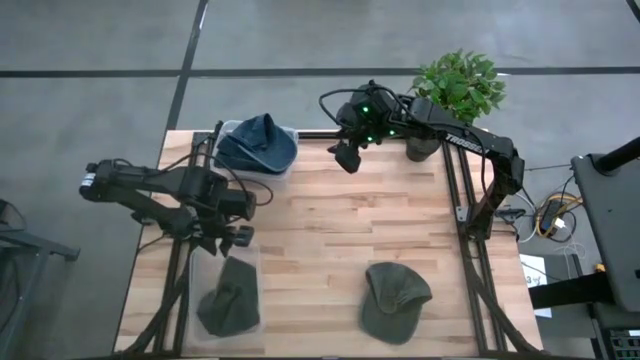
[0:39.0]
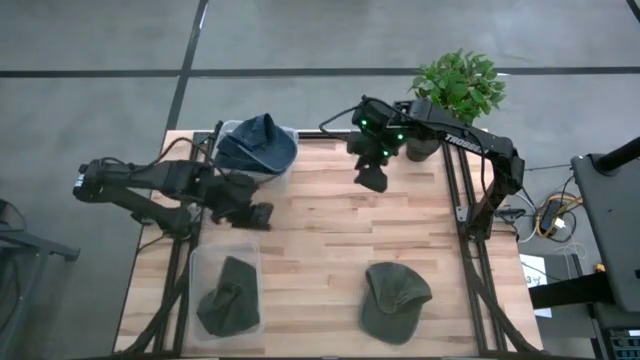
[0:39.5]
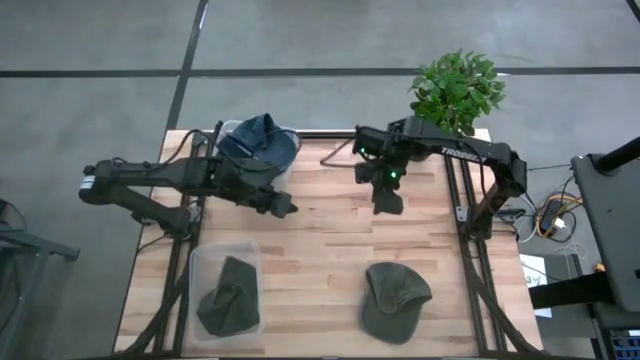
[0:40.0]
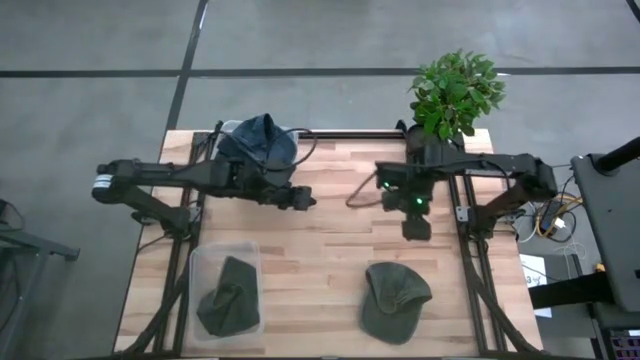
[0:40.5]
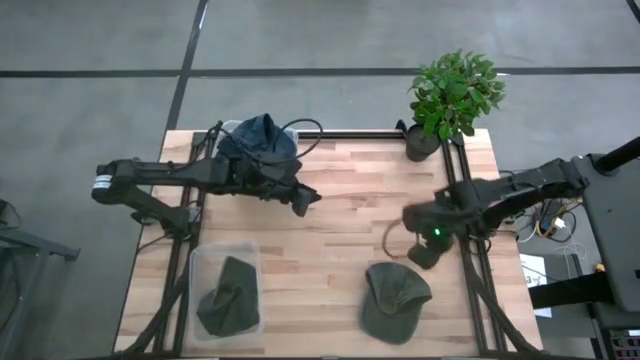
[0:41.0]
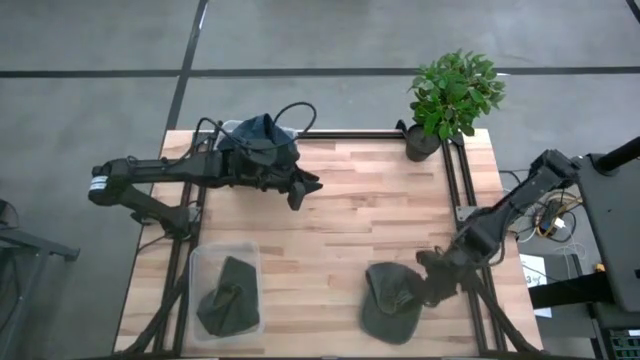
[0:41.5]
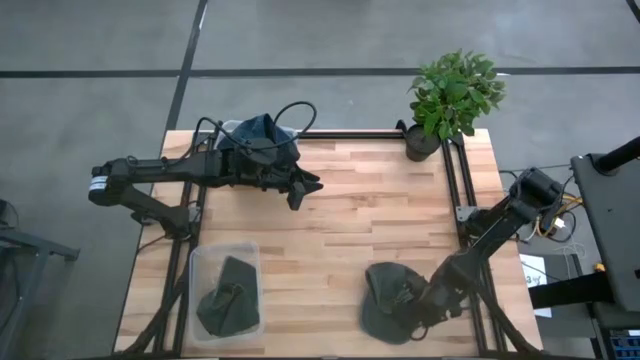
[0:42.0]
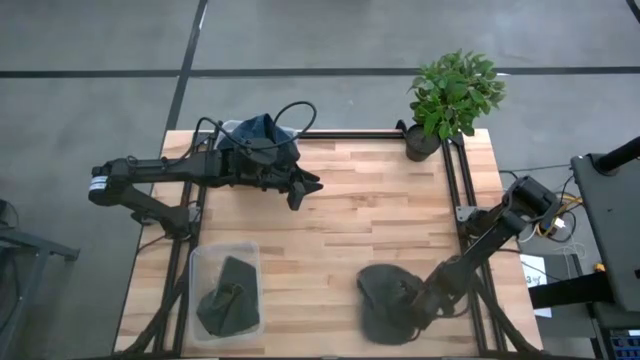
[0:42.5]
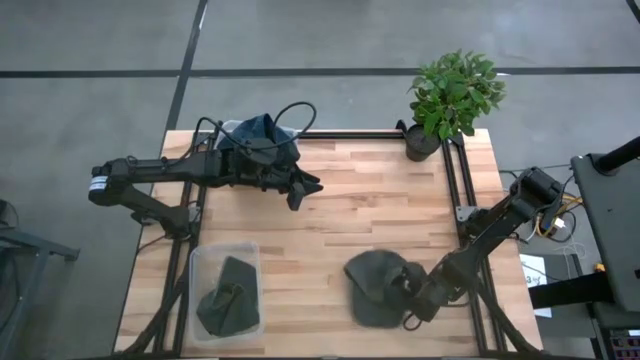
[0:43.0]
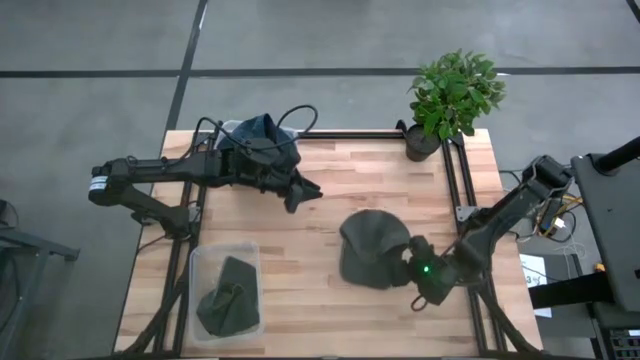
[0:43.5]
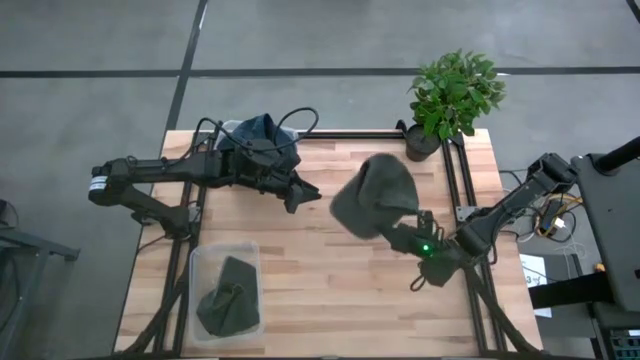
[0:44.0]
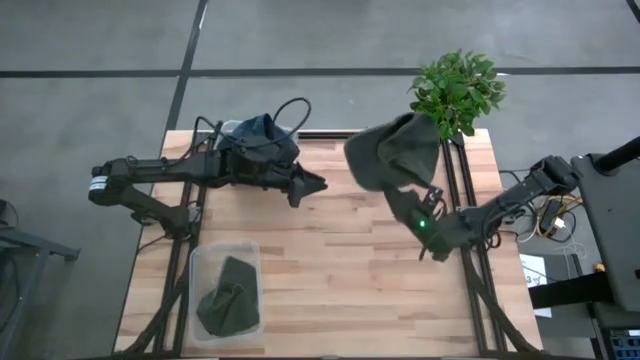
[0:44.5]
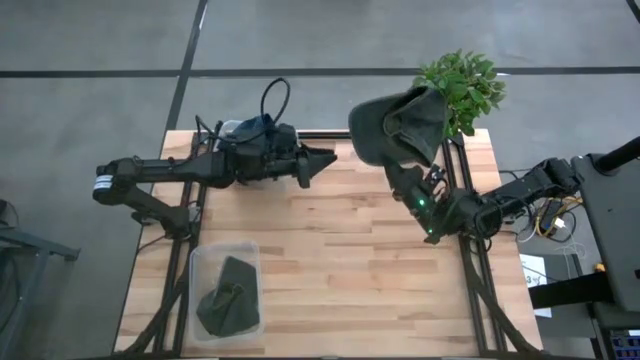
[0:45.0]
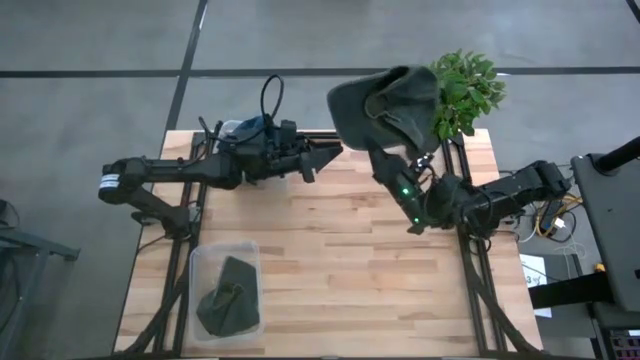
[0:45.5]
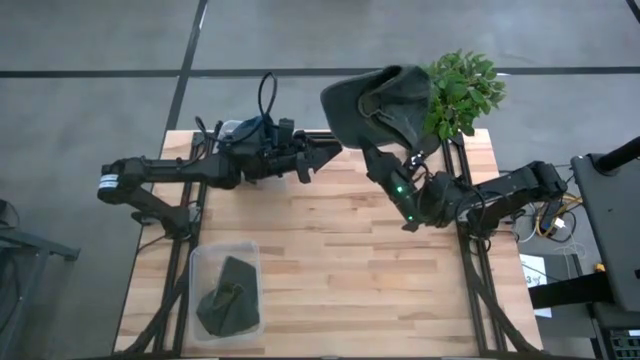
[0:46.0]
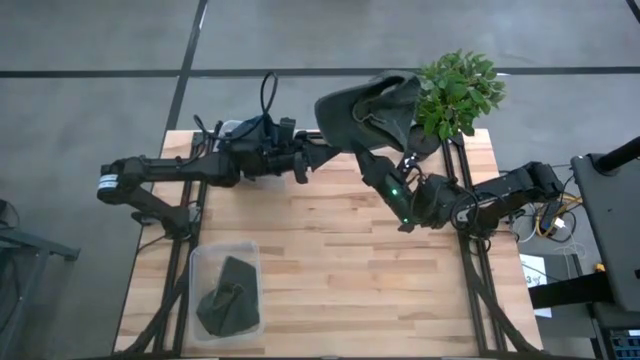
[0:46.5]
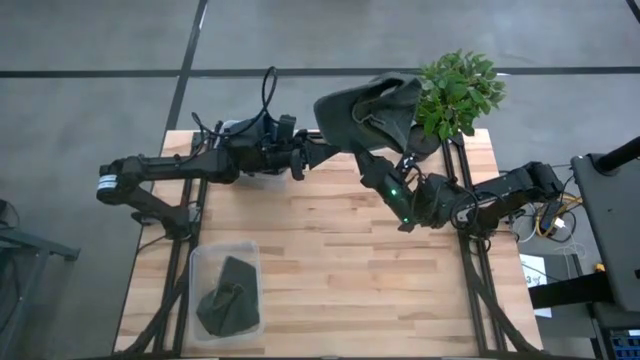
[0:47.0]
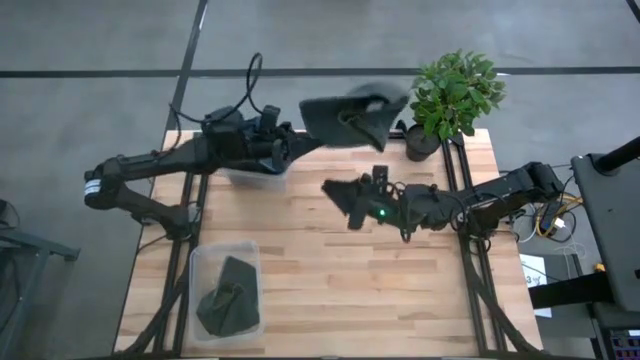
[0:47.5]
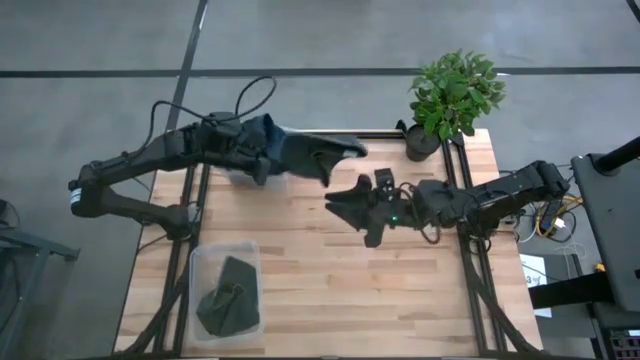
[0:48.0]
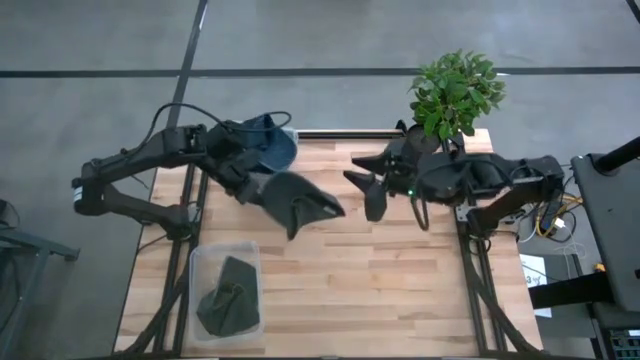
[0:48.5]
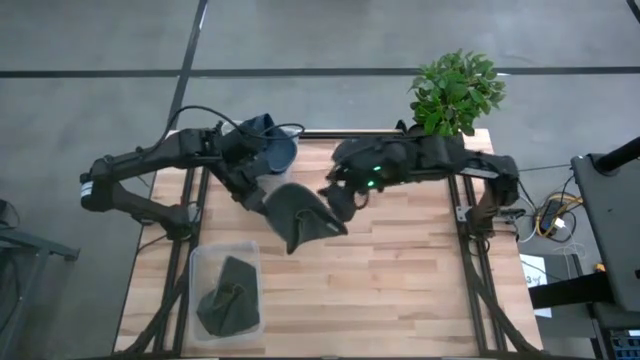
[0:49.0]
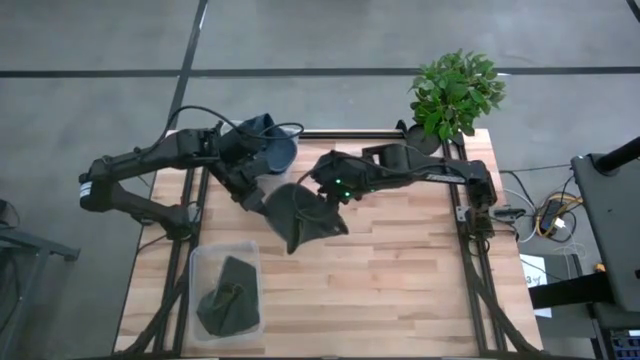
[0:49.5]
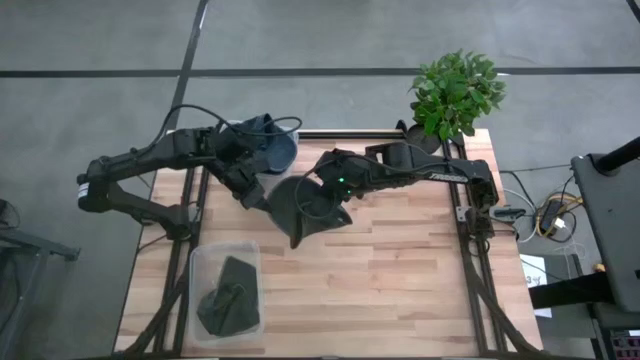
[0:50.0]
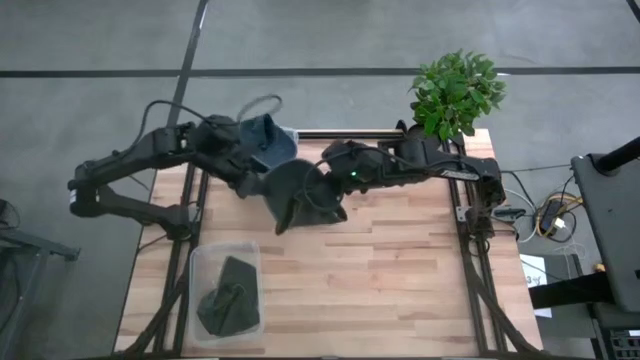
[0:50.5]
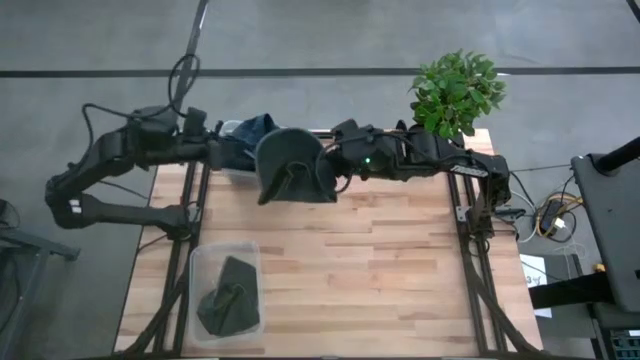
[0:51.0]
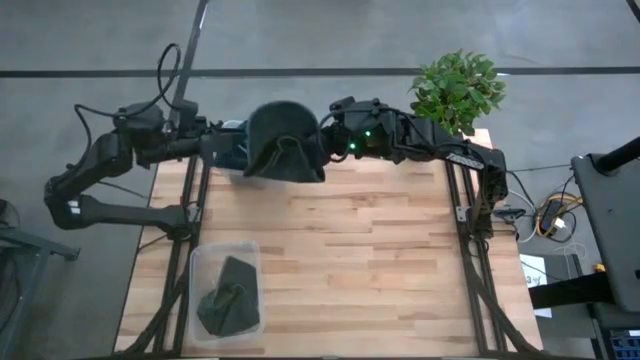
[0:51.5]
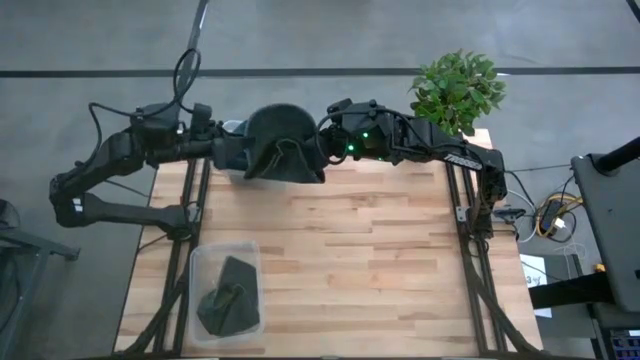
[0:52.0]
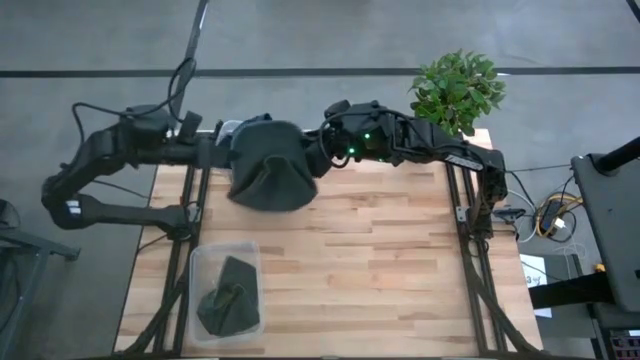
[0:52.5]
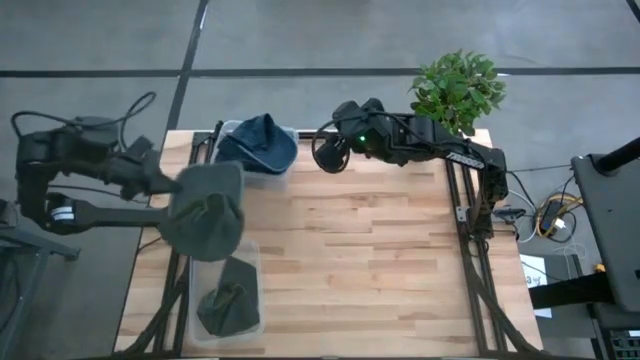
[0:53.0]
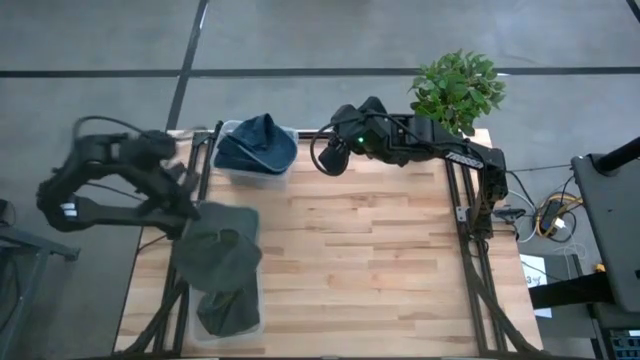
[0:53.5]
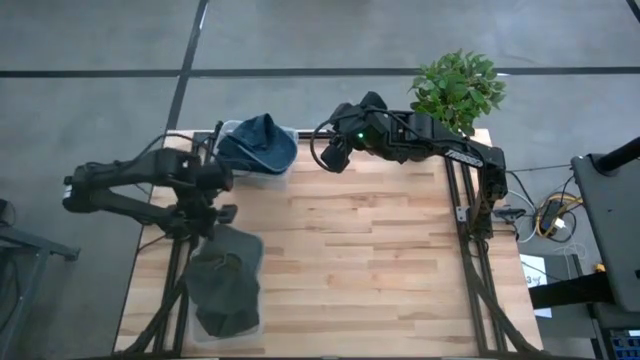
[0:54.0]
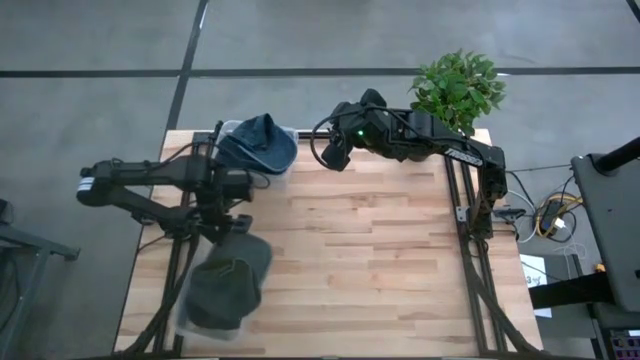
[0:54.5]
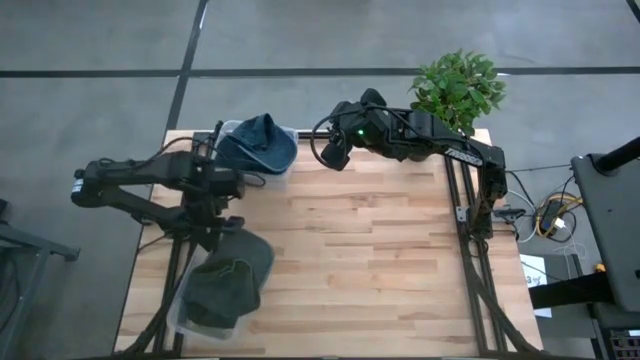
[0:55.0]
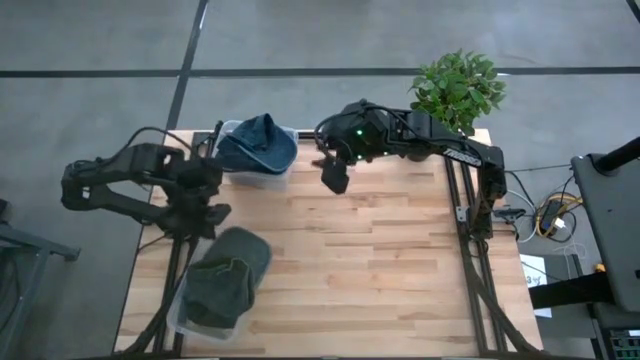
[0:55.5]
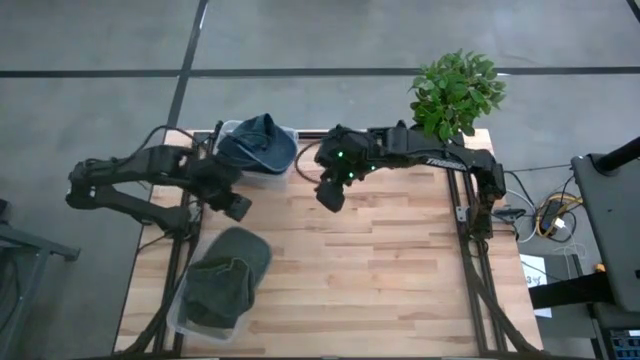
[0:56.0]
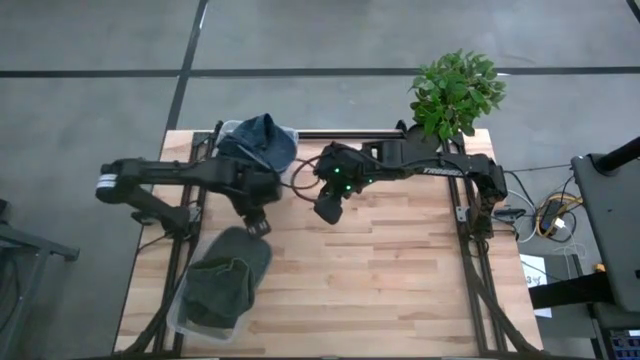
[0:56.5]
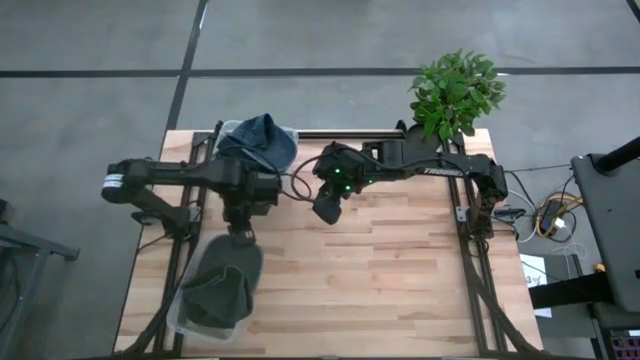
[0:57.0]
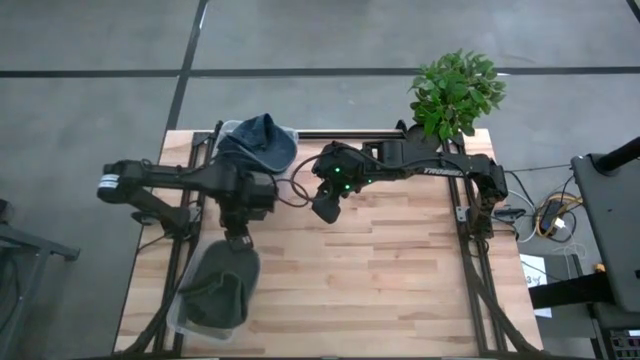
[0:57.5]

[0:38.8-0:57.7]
Task: Pick & Place hat
Put the green cap into the bottom transparent bin
